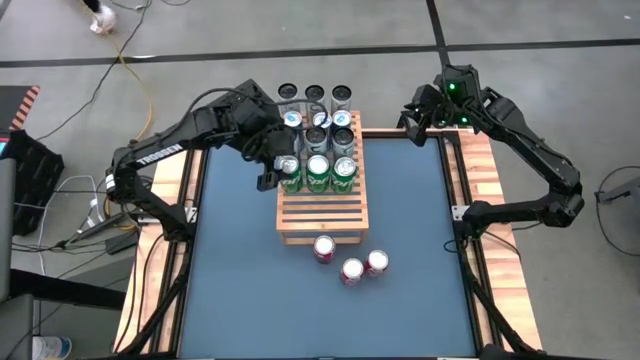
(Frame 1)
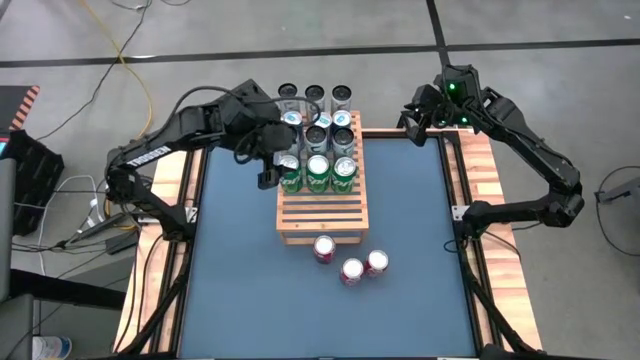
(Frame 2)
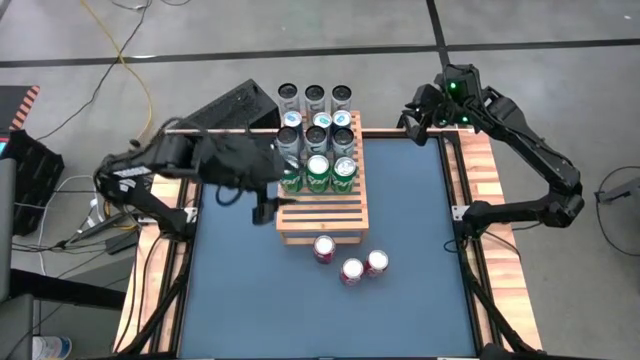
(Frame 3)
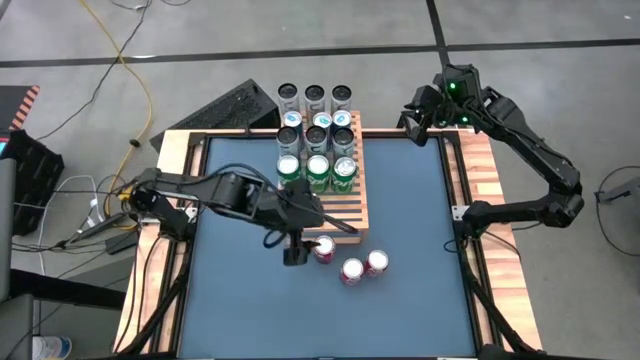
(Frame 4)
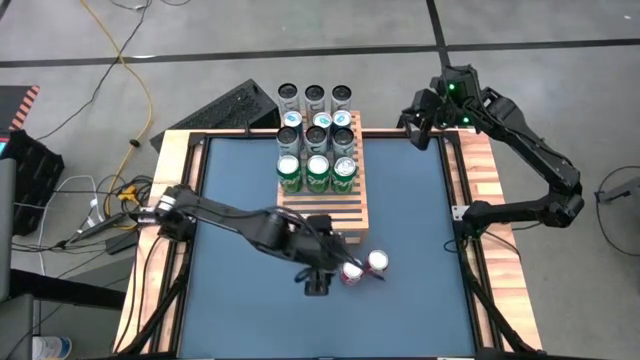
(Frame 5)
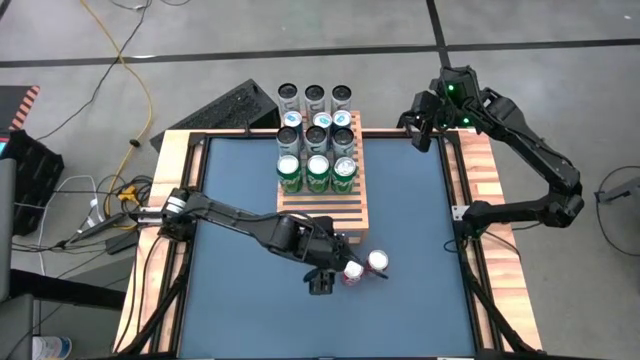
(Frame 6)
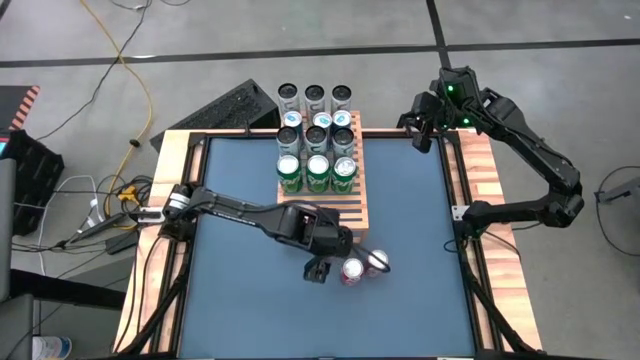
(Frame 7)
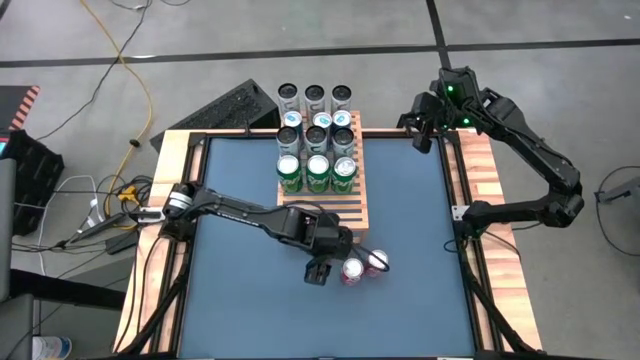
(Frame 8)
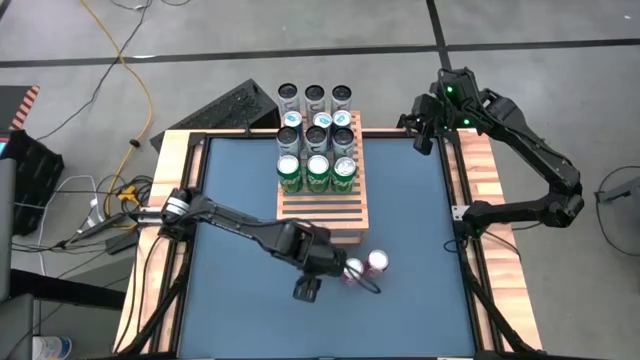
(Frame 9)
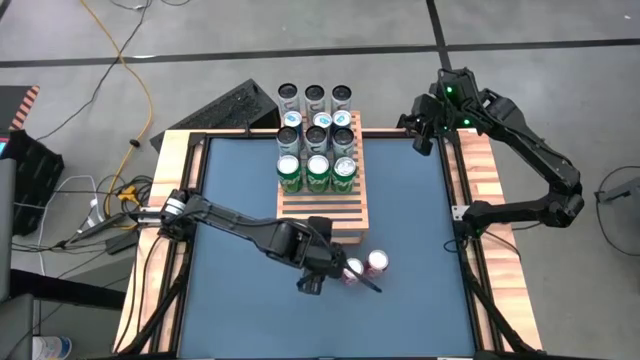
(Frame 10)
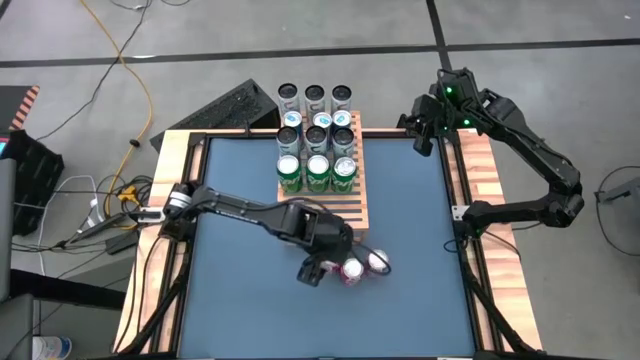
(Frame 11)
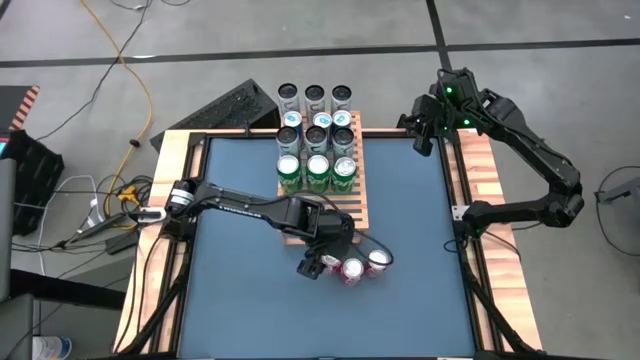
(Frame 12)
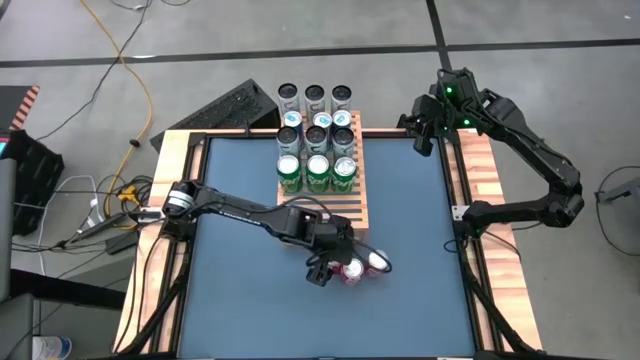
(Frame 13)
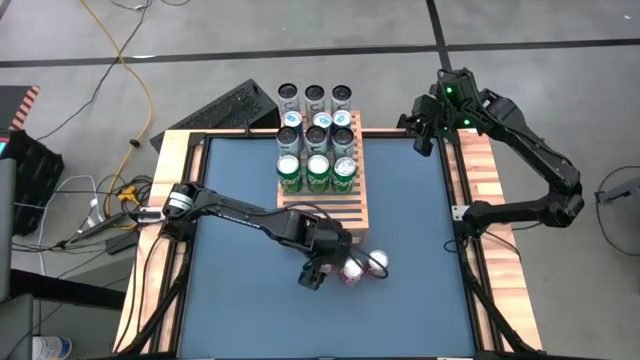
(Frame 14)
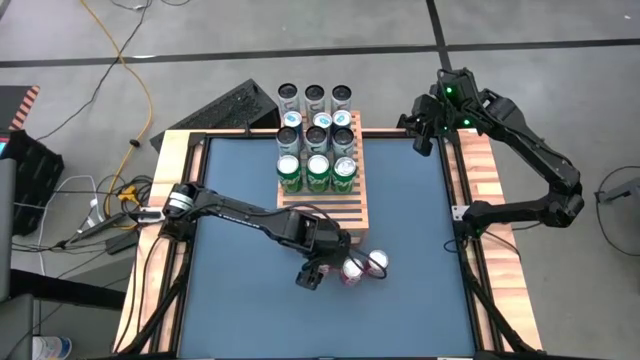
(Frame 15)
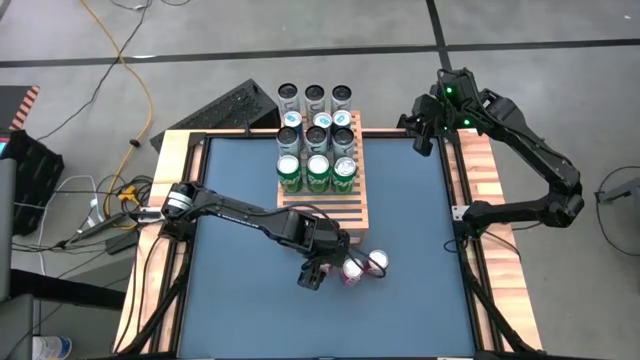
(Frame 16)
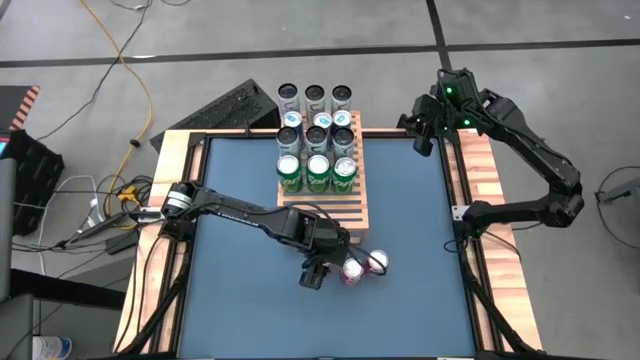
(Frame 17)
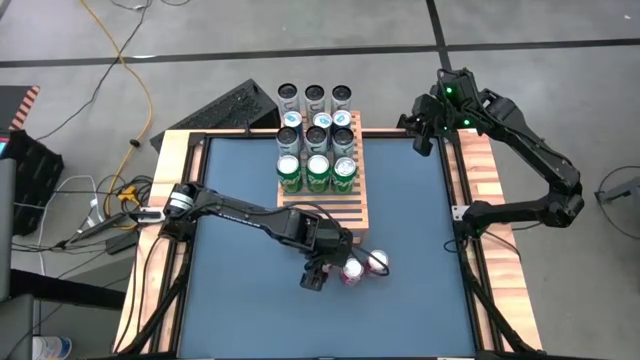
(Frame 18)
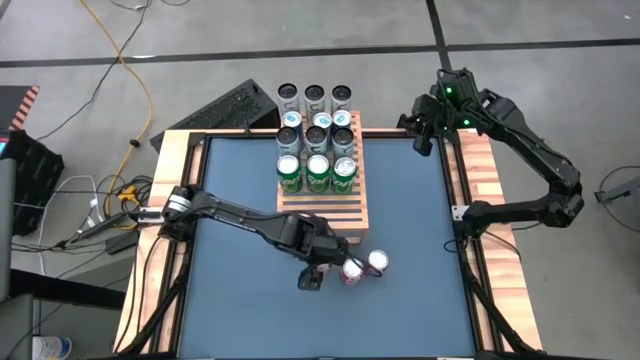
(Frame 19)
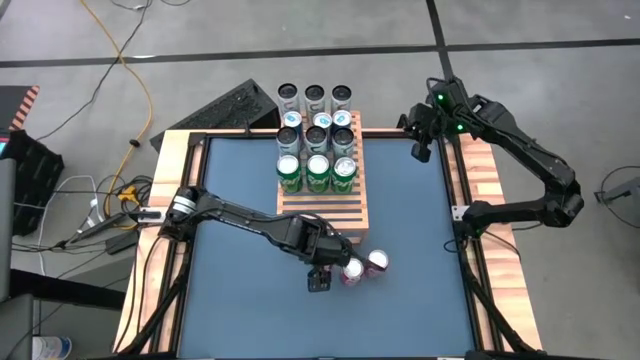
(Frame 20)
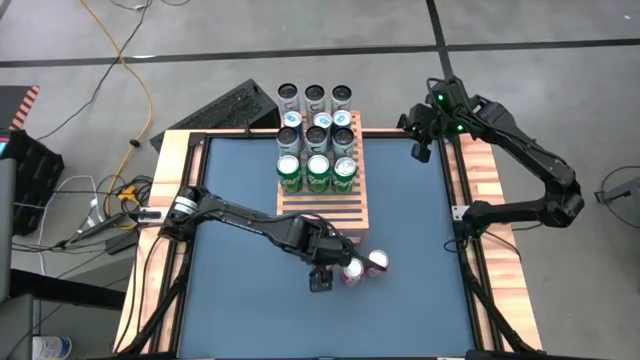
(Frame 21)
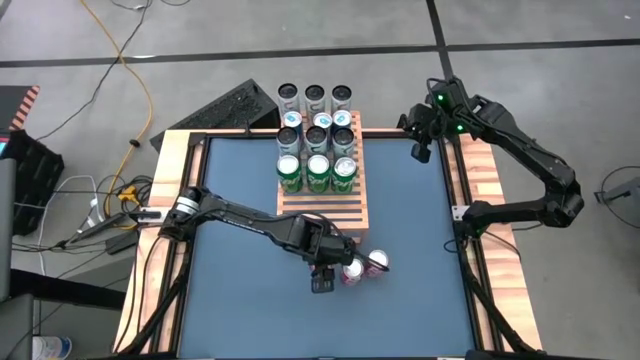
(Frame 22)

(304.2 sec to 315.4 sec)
Task: Place canned beverage on shelf
Put the top left red soda can on the shelf

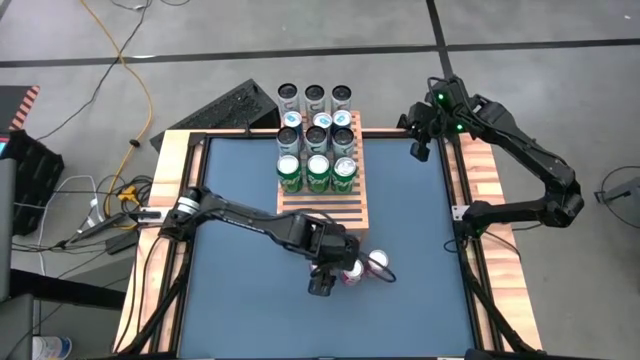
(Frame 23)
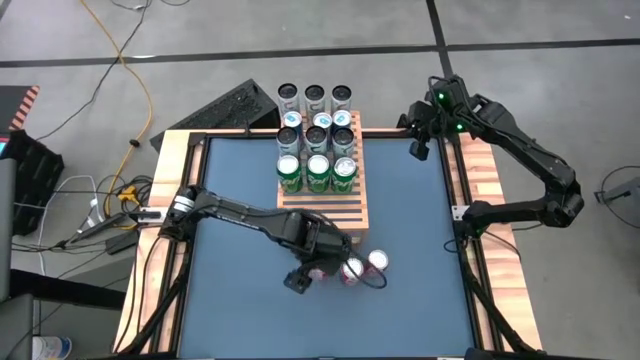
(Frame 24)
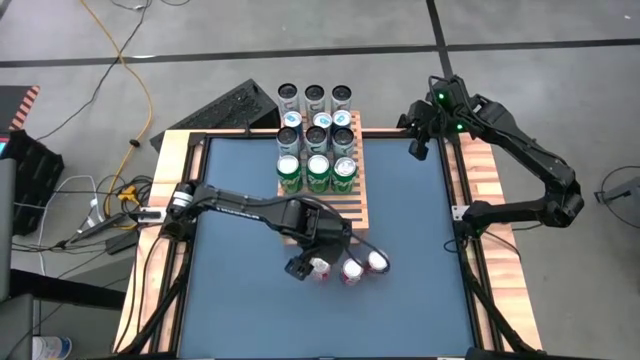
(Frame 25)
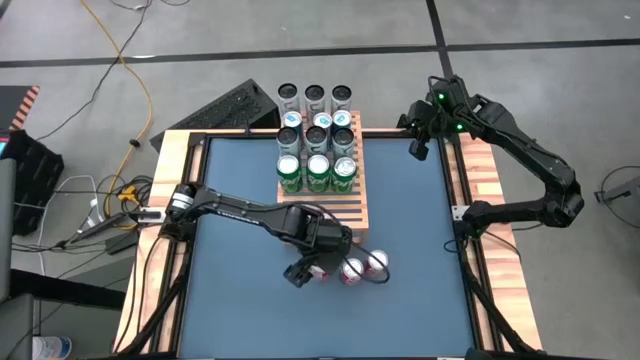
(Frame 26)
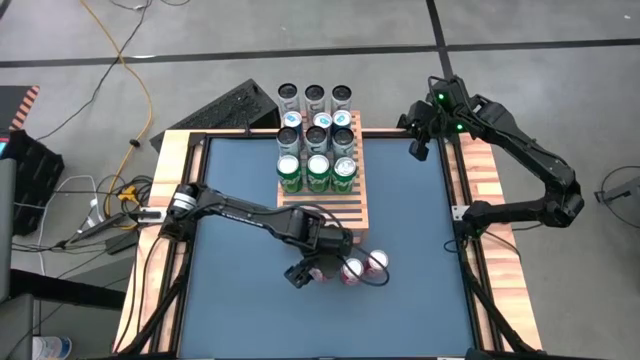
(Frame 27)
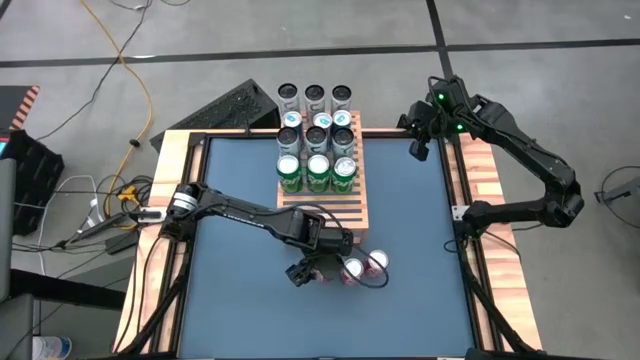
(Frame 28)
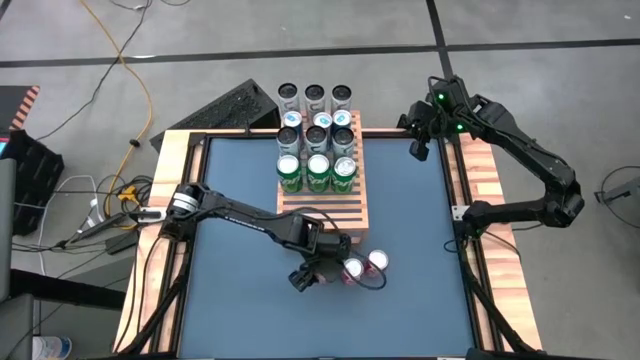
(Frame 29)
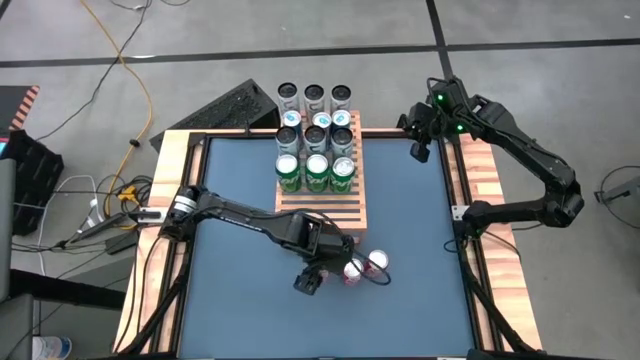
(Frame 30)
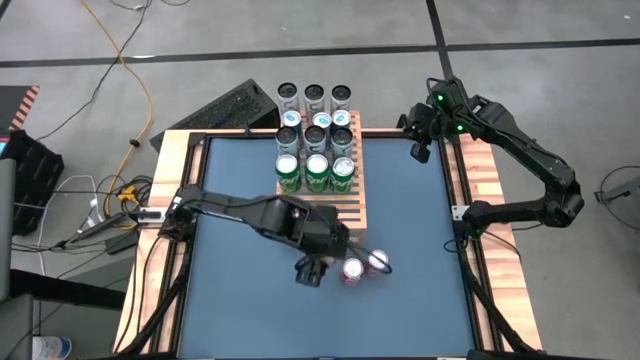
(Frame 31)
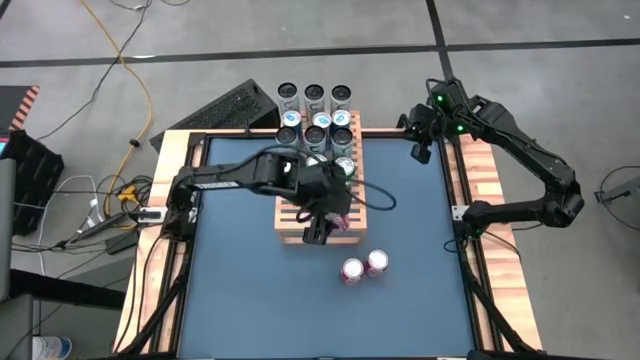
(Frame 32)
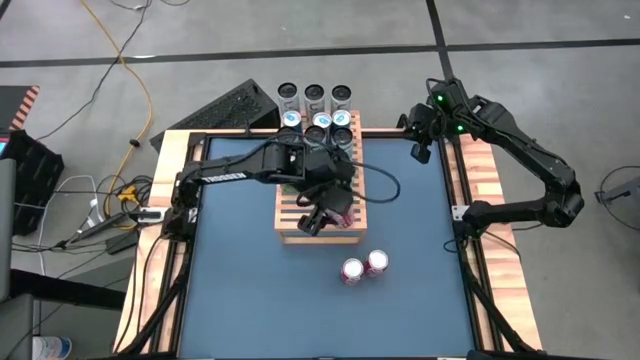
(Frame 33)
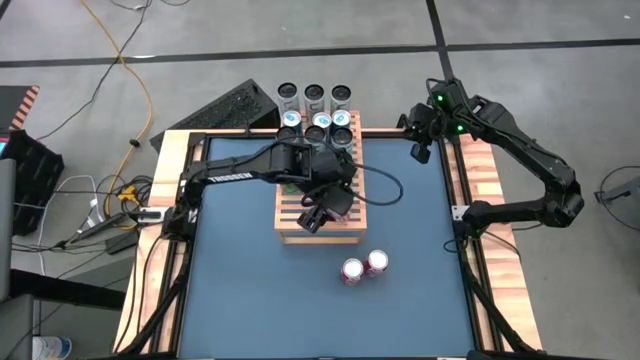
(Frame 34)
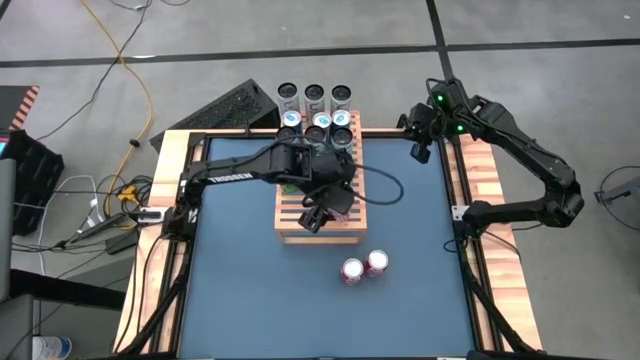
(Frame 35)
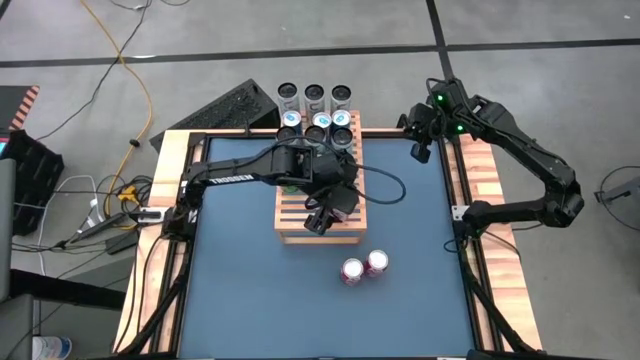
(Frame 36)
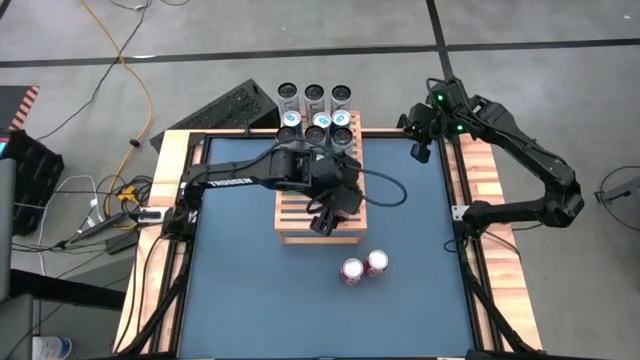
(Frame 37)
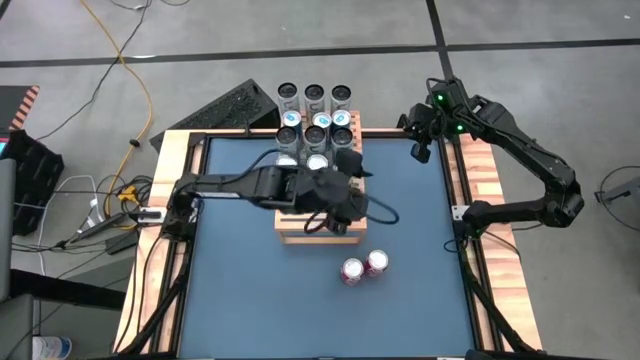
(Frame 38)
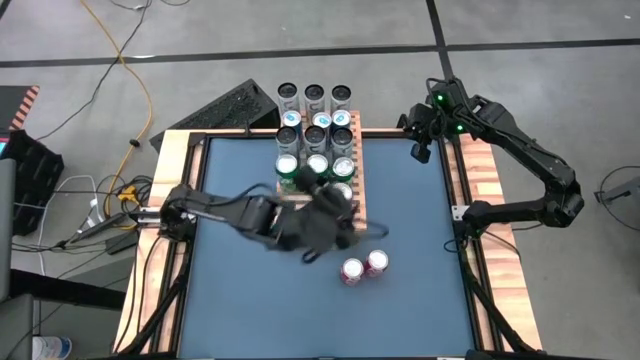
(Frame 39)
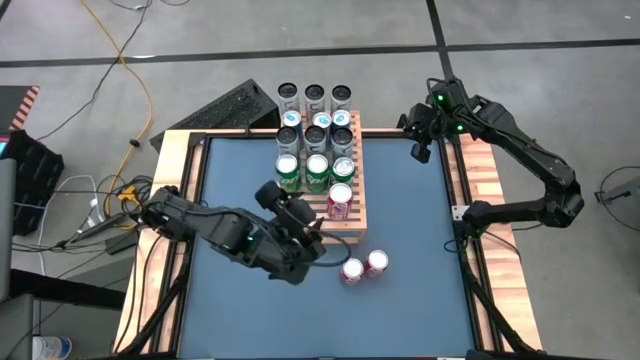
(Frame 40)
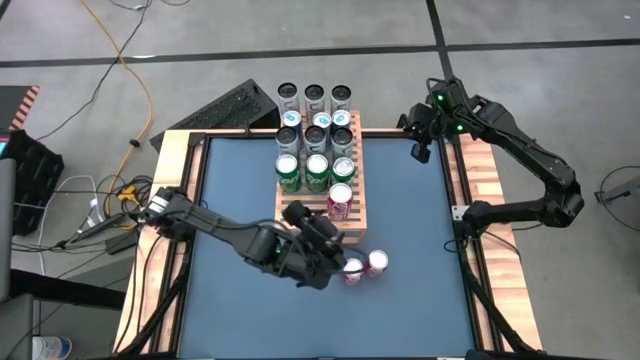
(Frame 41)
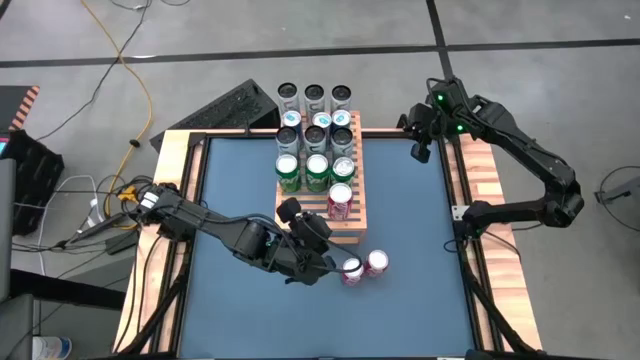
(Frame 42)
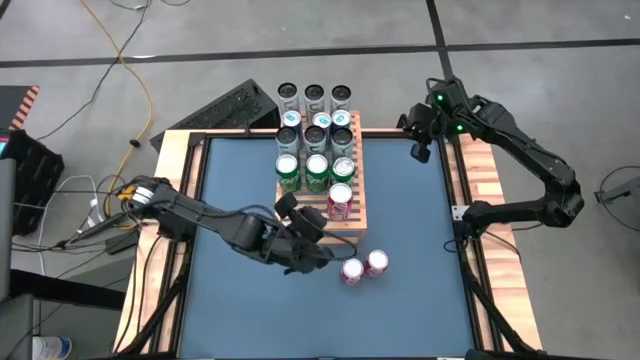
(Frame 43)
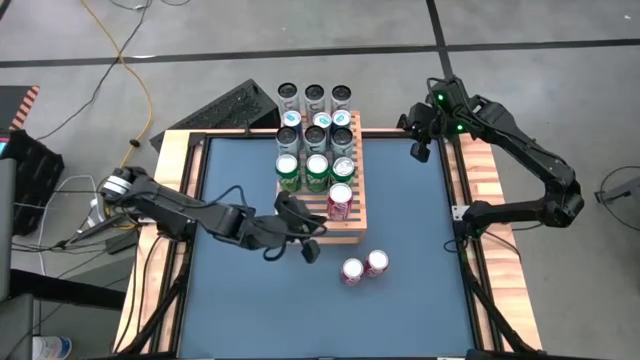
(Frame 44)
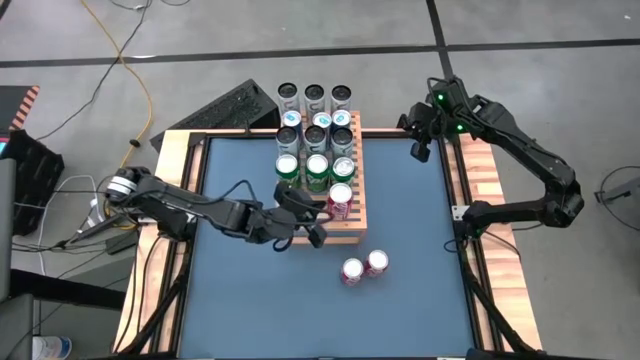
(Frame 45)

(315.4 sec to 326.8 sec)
Put the top left red soda can on the shelf
